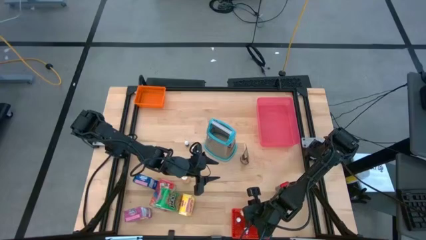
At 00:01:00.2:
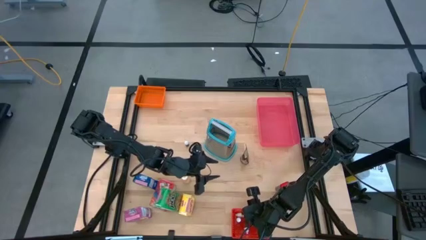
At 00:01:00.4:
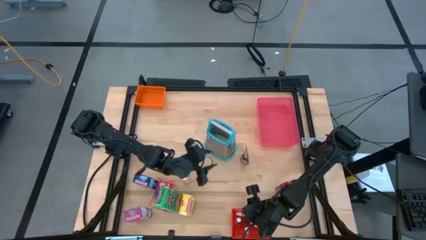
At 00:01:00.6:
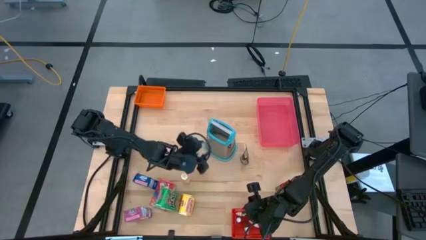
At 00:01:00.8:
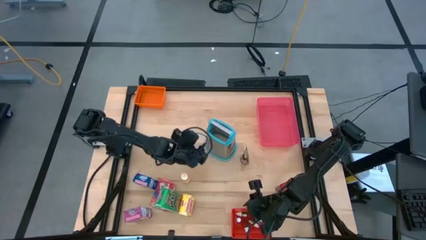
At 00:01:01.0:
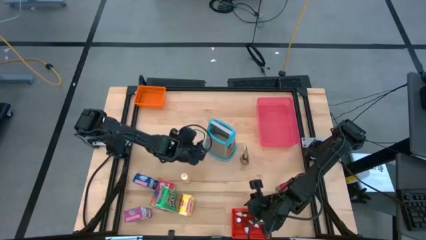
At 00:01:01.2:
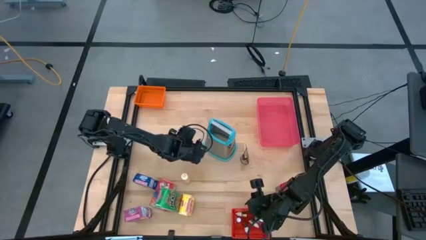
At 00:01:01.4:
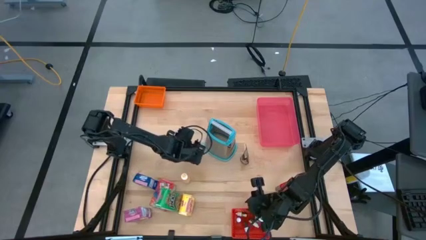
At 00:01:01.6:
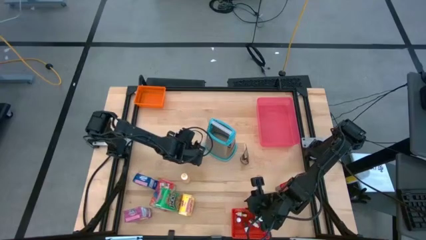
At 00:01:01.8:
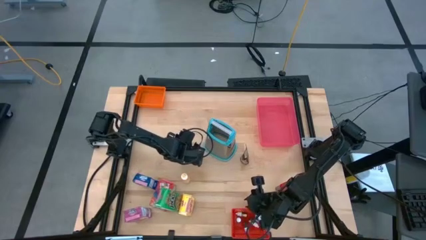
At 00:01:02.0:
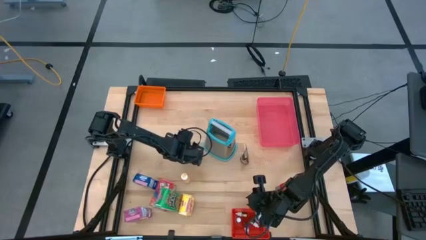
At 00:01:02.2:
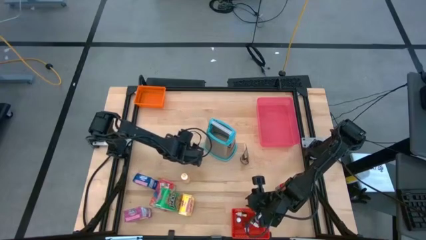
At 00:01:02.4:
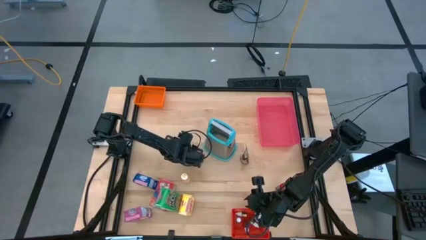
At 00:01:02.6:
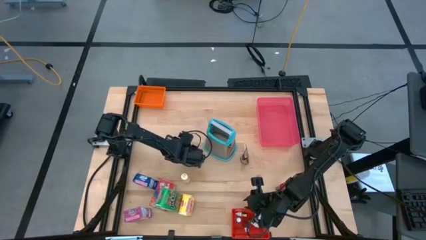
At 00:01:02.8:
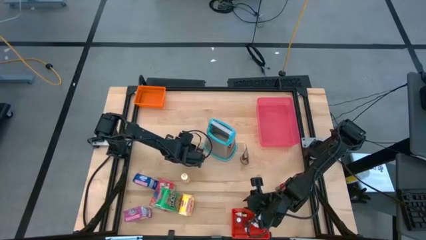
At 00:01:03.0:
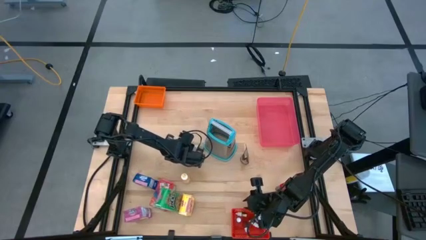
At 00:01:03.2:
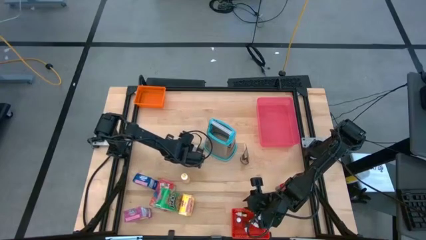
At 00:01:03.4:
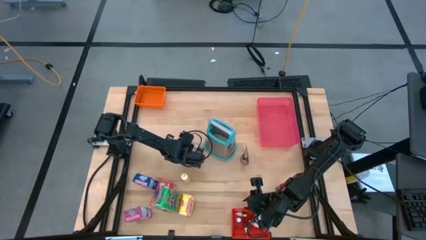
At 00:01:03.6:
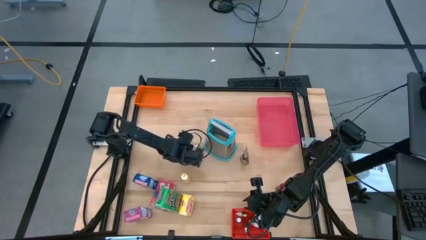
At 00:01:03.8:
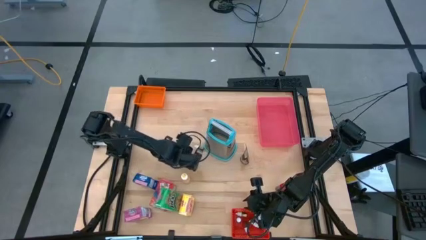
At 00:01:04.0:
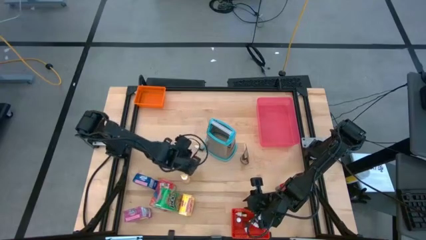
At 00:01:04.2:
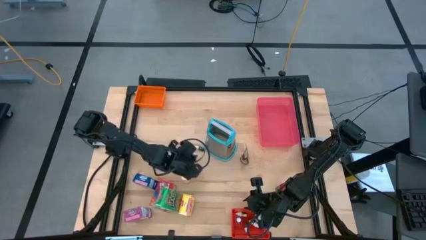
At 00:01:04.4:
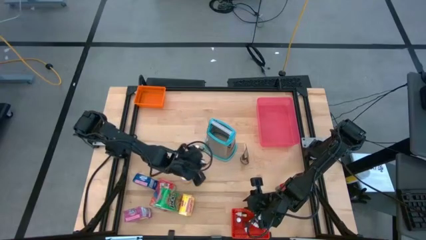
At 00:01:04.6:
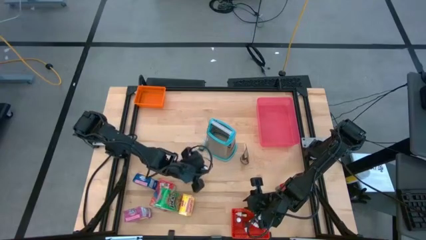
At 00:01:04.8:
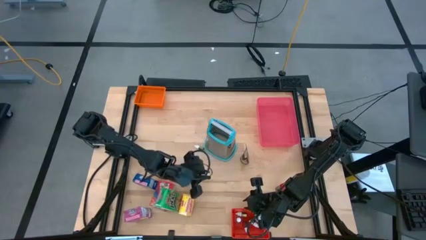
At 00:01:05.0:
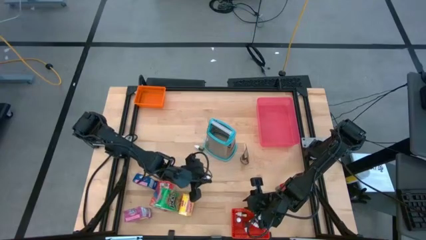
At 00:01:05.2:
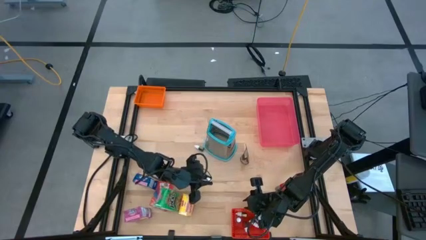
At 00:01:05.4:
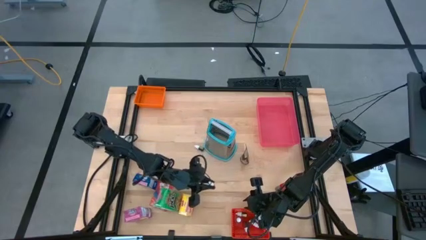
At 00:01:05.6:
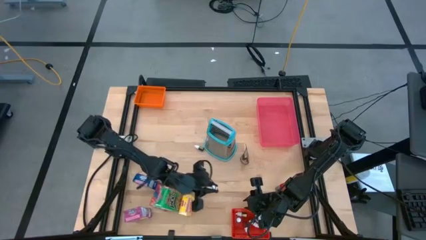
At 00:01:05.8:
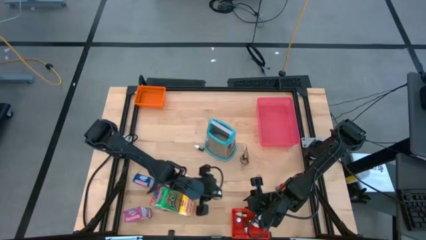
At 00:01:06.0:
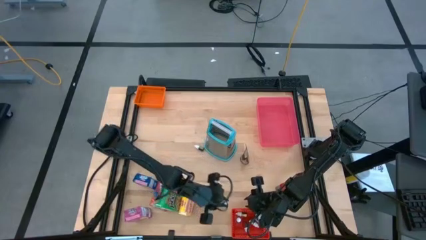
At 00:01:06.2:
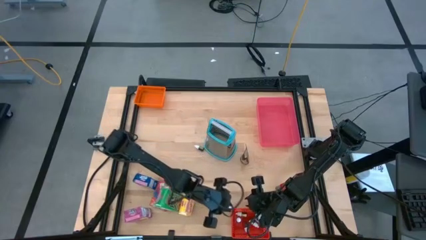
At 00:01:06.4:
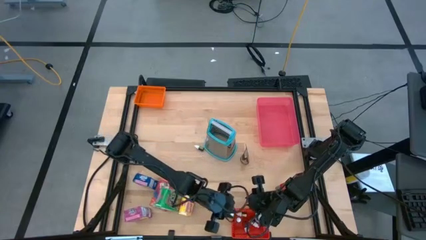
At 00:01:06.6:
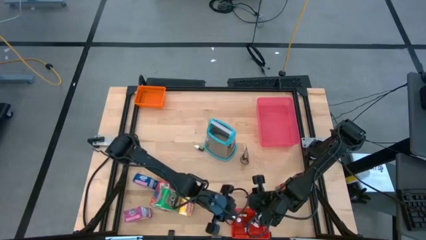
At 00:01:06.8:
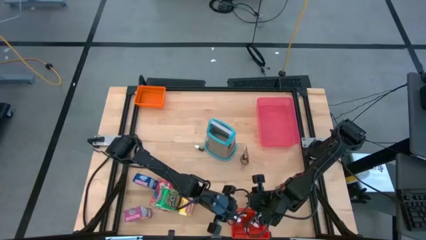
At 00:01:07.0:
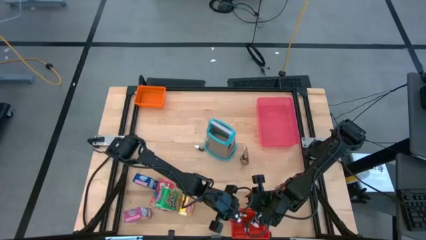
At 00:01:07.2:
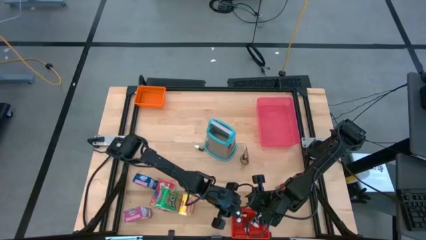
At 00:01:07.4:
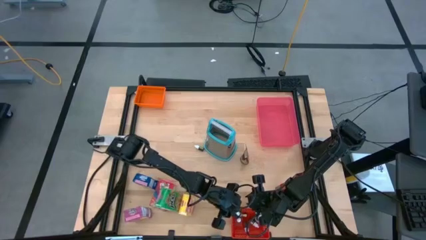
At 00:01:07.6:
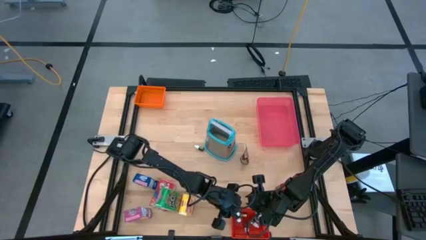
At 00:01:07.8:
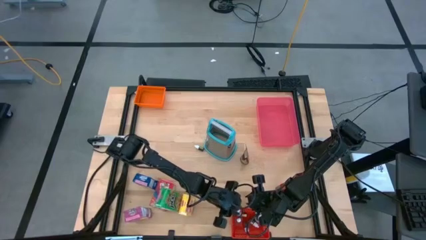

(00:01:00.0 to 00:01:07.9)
Task: Pick & Place Kitchen Items
Put the small orange food coloring bottle into the red bin

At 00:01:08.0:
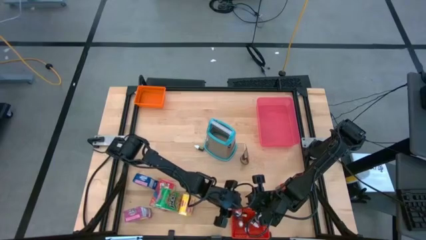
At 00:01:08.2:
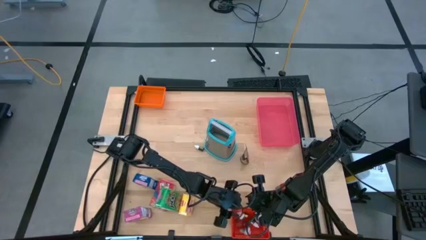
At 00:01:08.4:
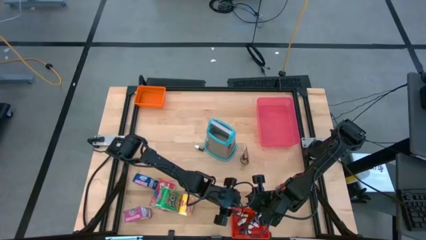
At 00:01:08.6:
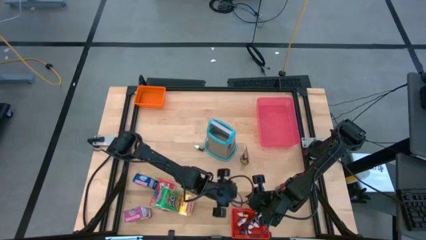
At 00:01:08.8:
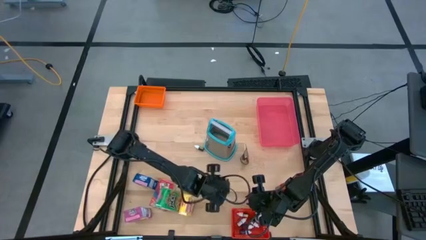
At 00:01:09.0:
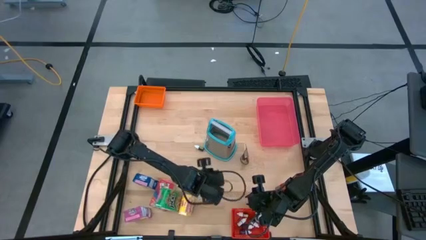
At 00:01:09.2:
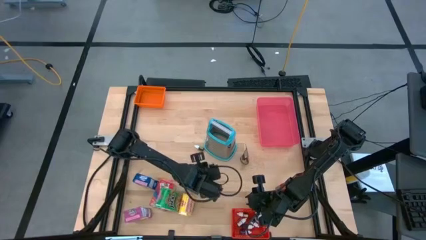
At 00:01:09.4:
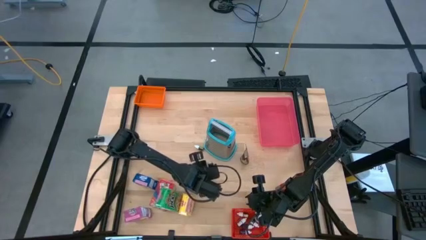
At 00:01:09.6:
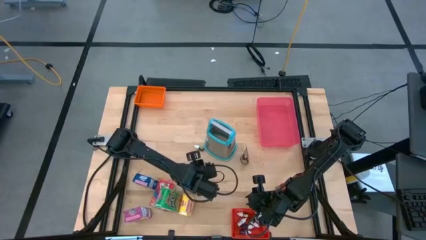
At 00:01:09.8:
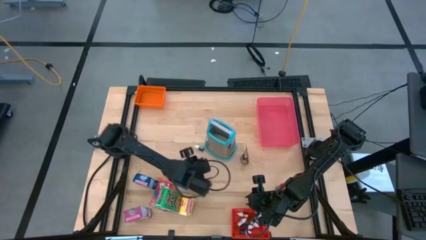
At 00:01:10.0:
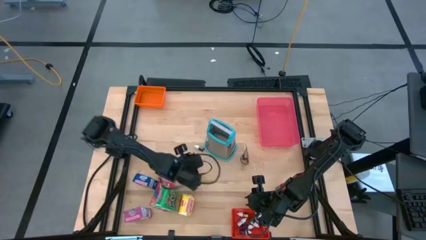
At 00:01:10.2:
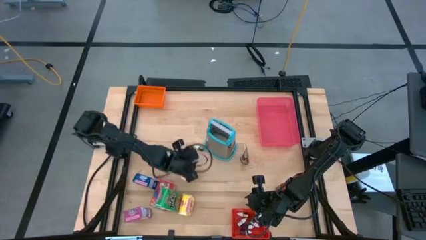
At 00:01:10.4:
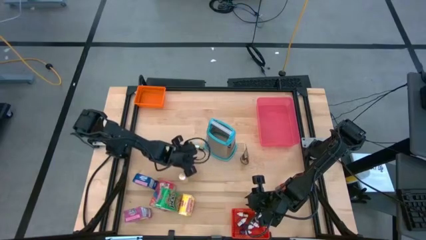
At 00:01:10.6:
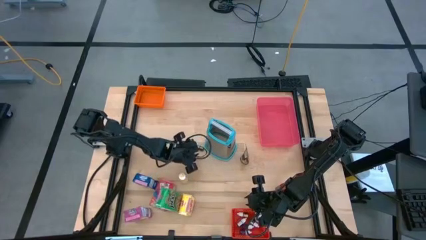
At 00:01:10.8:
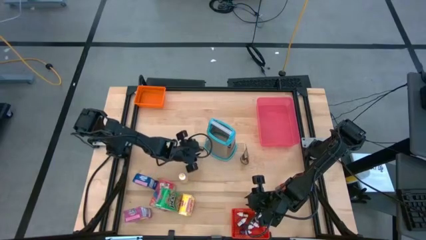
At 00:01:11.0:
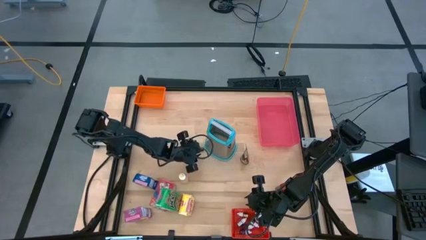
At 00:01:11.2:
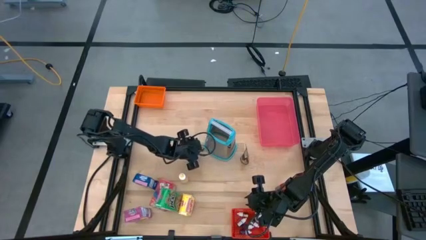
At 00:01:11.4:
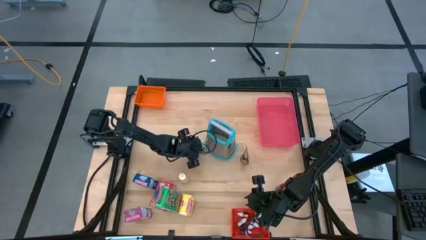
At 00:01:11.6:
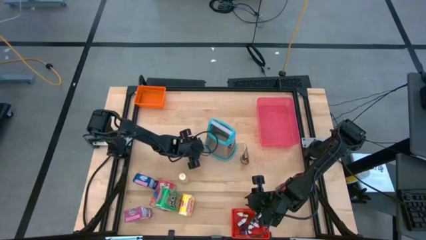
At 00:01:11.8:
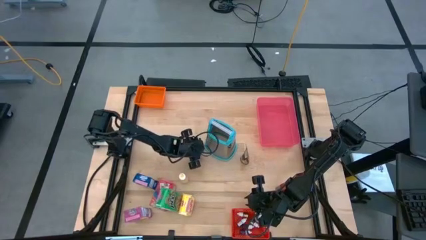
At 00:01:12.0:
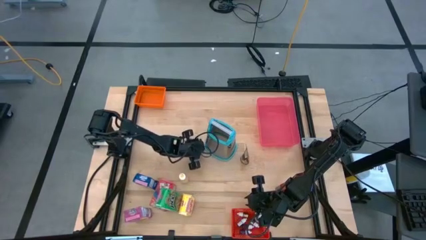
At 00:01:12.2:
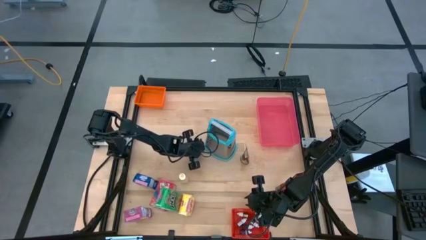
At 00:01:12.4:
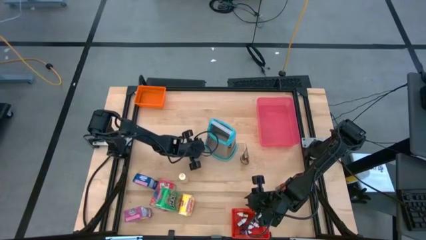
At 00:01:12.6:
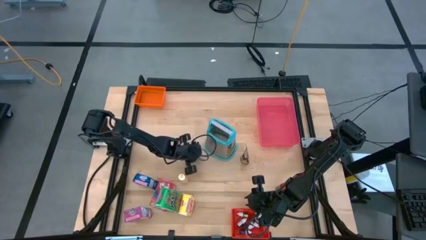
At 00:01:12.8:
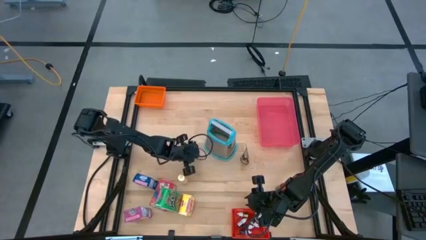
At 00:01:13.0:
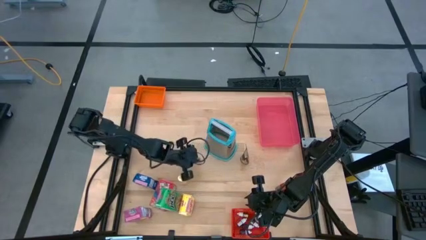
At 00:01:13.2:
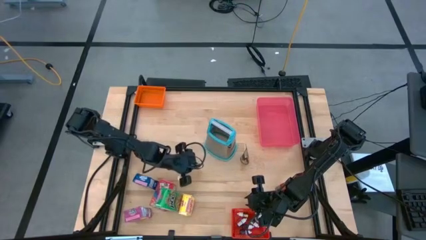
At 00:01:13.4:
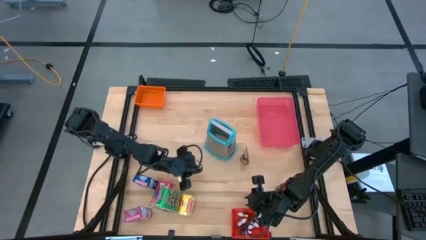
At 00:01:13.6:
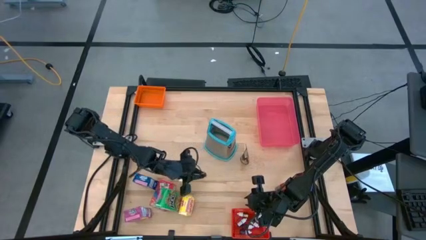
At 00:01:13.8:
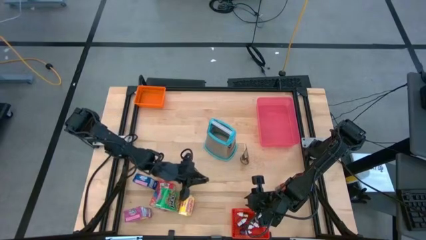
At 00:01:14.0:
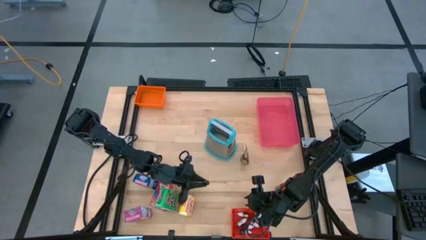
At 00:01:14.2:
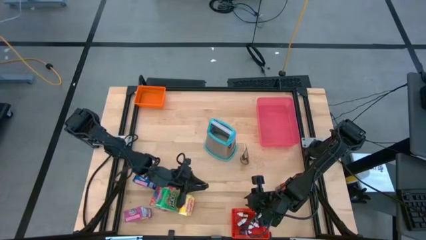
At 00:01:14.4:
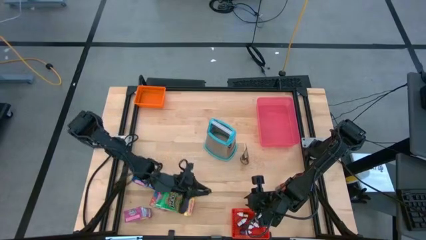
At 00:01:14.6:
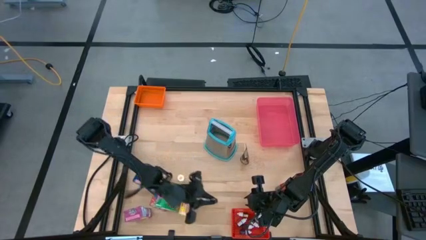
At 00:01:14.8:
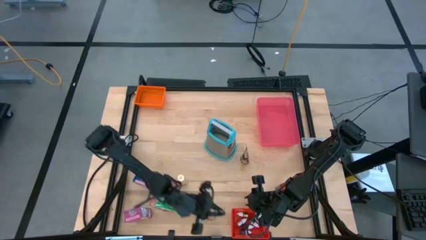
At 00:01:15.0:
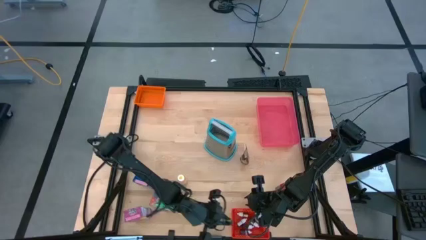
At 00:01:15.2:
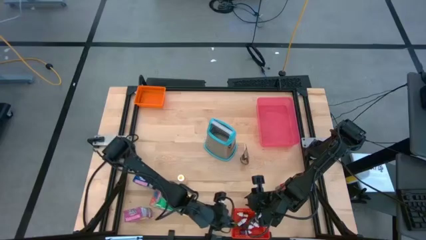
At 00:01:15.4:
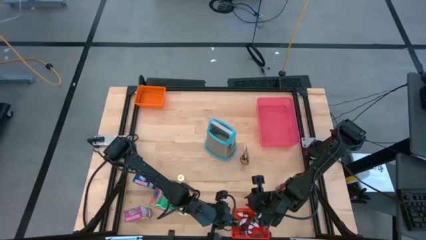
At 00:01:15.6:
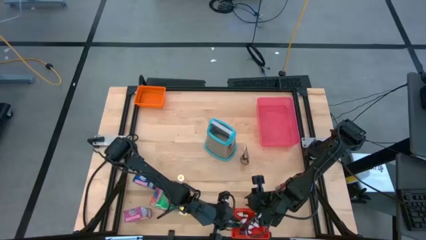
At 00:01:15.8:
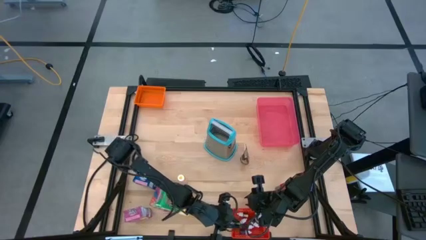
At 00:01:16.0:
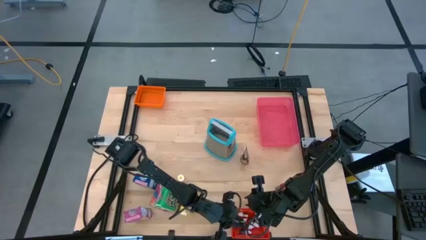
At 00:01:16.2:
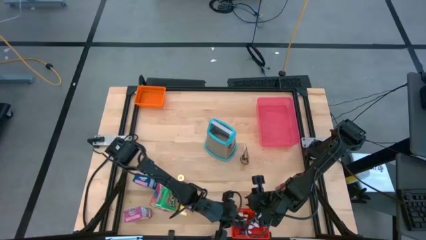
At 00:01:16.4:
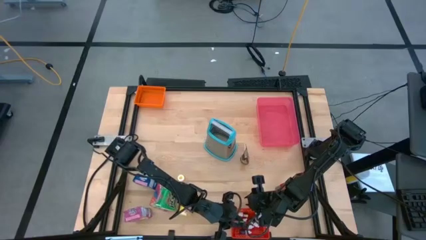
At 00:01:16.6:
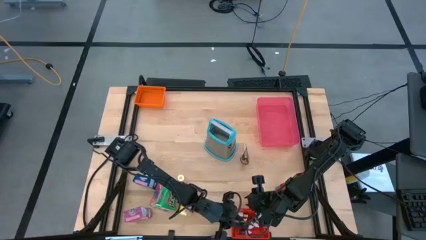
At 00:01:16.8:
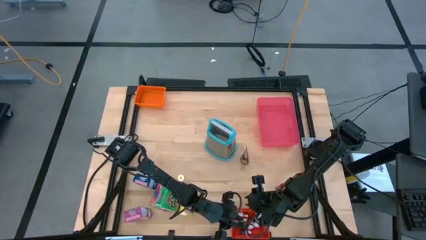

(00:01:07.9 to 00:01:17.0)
Put the small green food coloring bottle into the red bin
